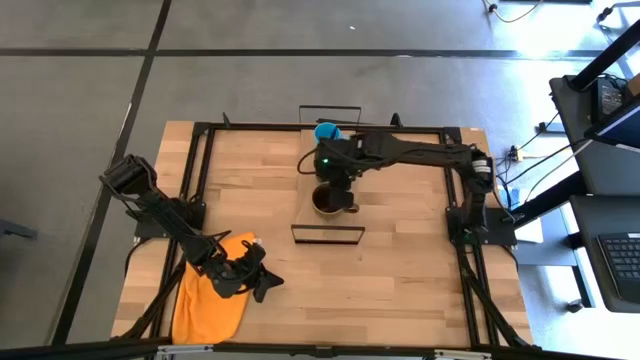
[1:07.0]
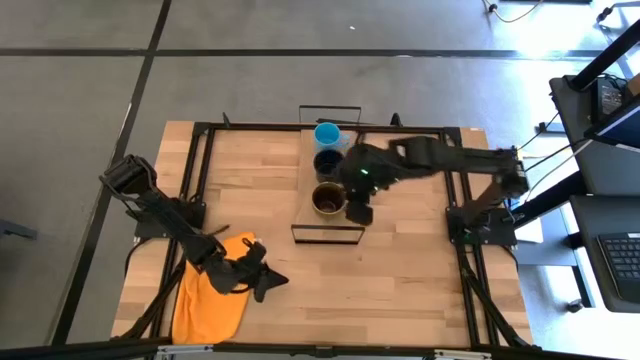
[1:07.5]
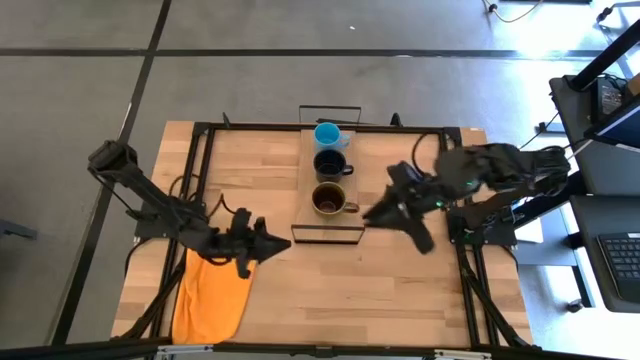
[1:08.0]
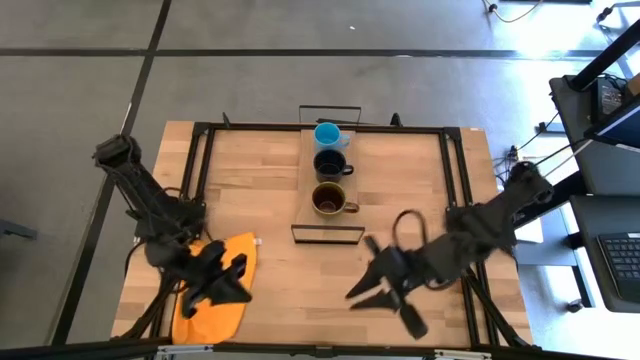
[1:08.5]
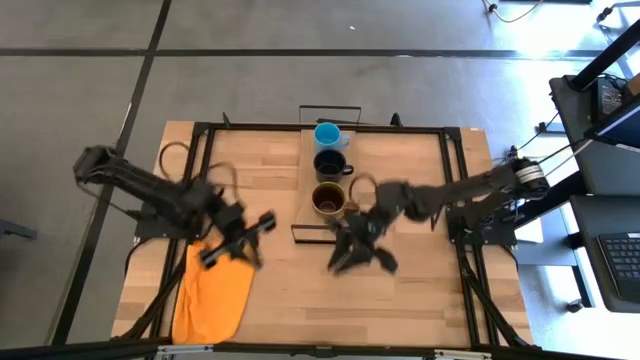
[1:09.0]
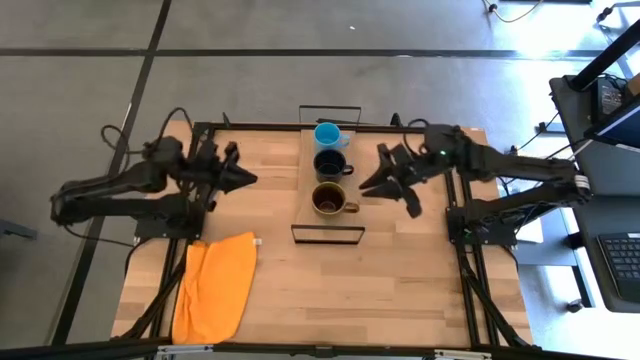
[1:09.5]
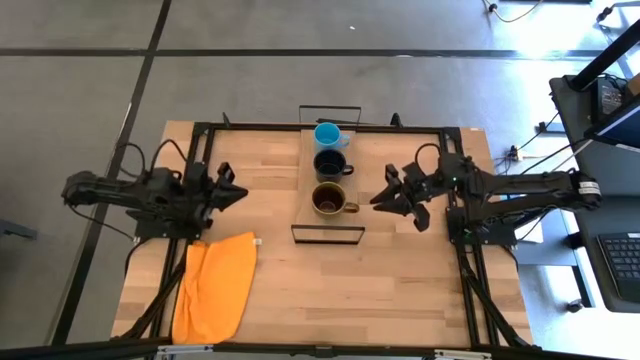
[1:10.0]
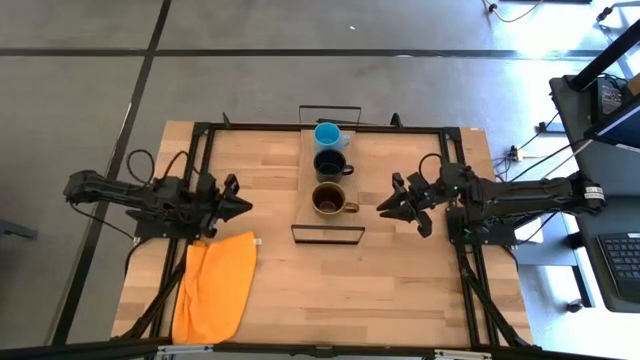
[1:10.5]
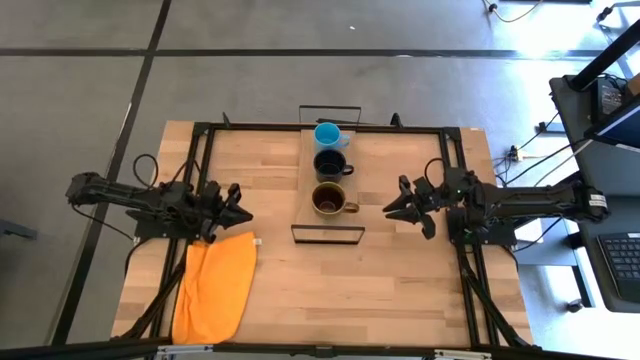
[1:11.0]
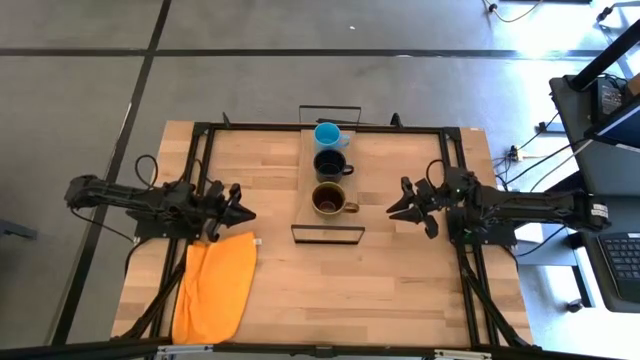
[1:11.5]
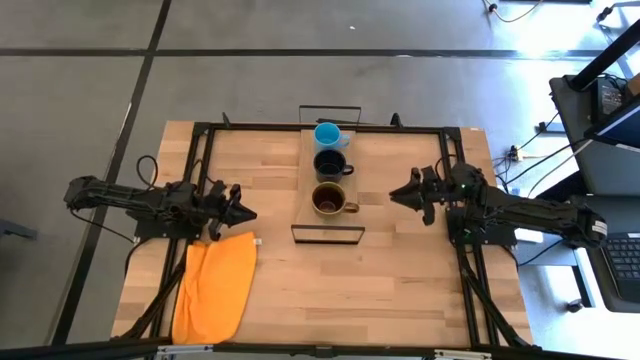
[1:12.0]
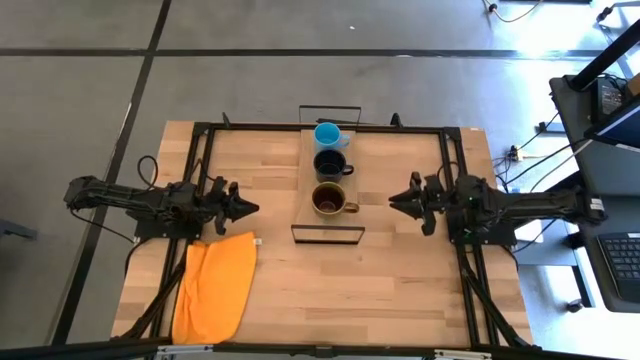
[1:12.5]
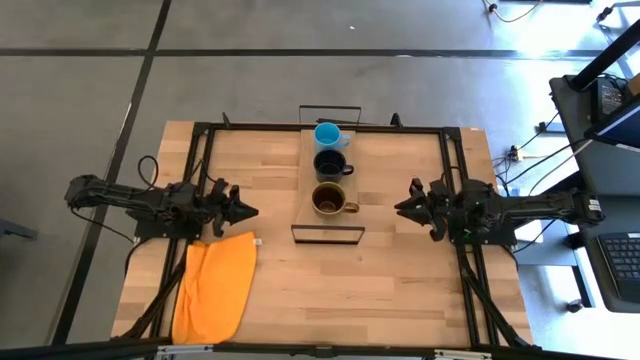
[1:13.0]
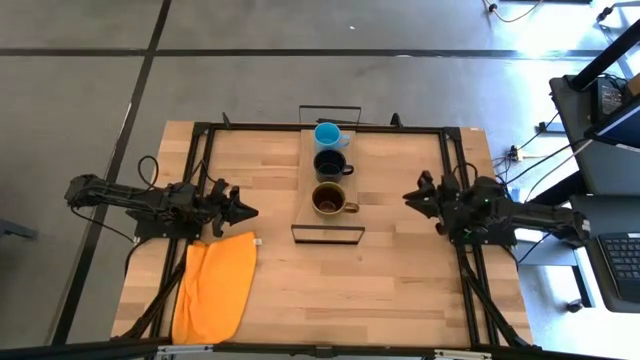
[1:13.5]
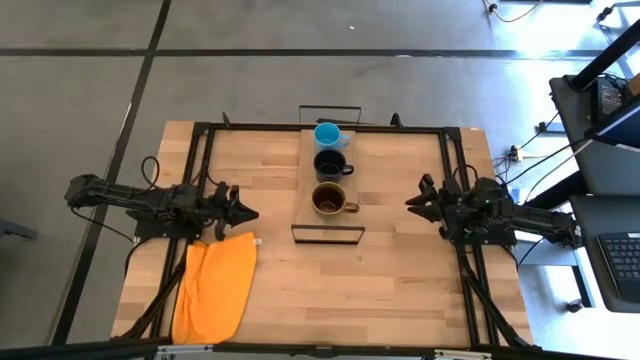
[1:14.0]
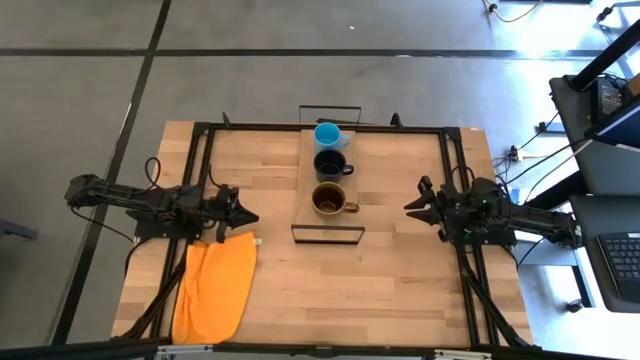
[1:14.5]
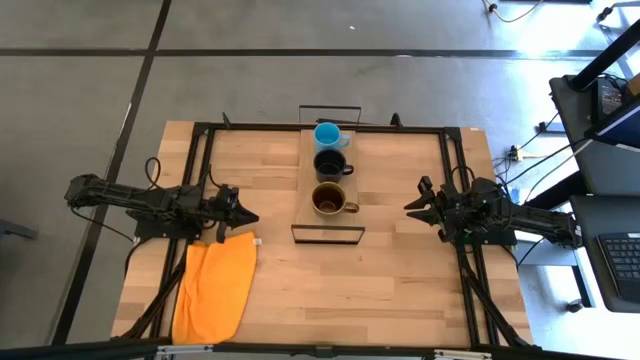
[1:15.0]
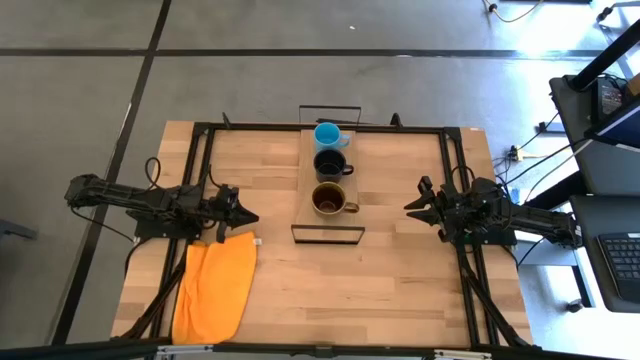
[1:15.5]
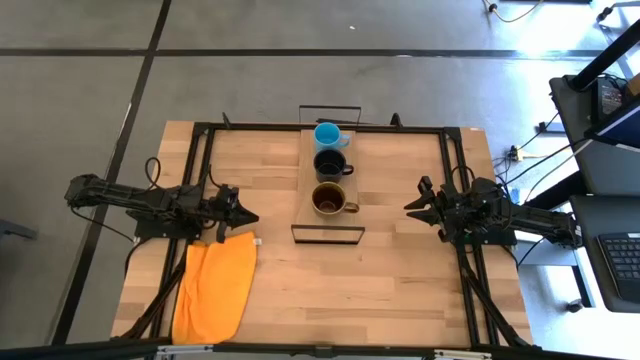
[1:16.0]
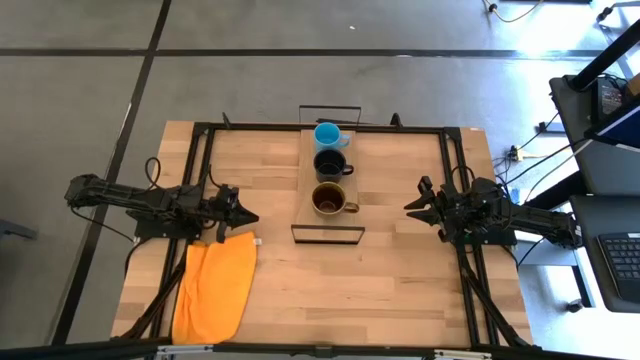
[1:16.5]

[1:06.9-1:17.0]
Task: Stack small to large cups/mugs on shelf
Return to Home Position

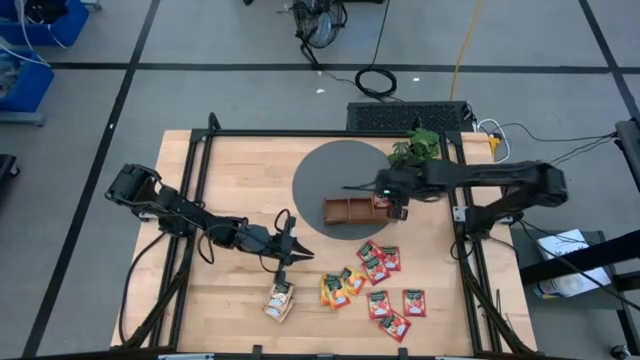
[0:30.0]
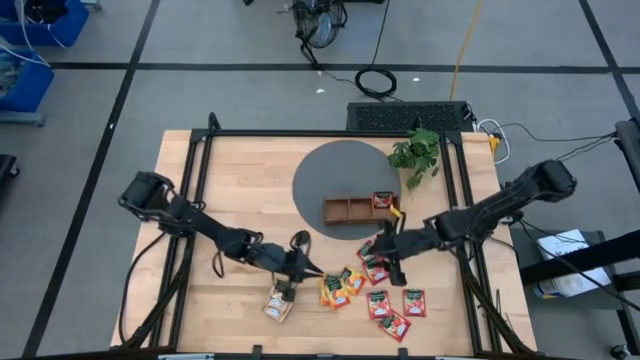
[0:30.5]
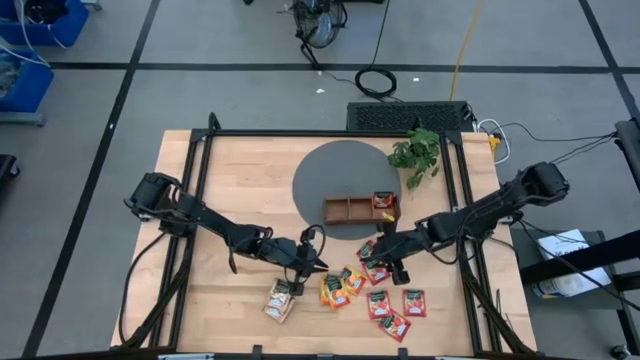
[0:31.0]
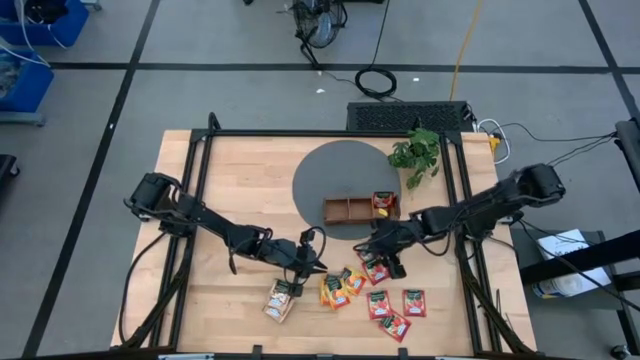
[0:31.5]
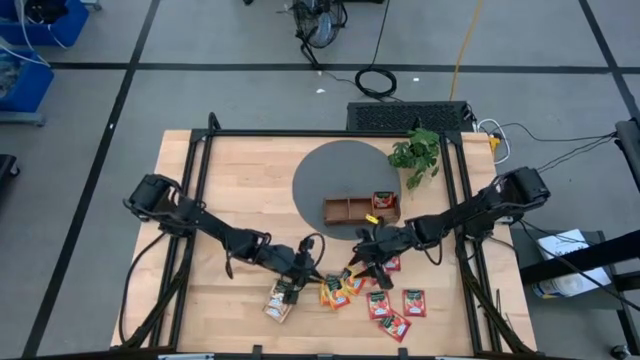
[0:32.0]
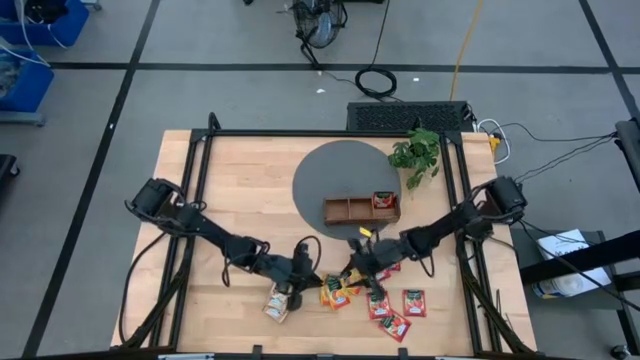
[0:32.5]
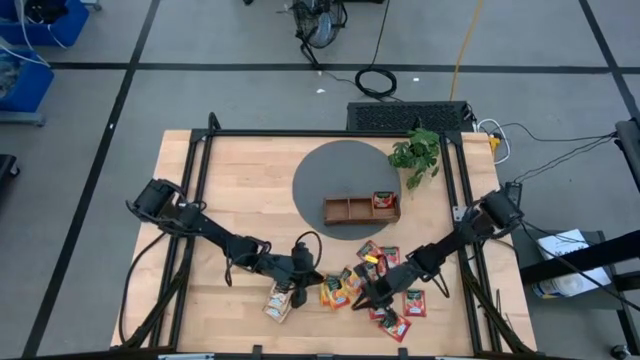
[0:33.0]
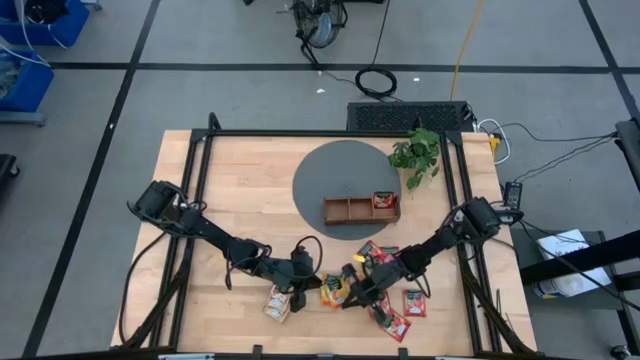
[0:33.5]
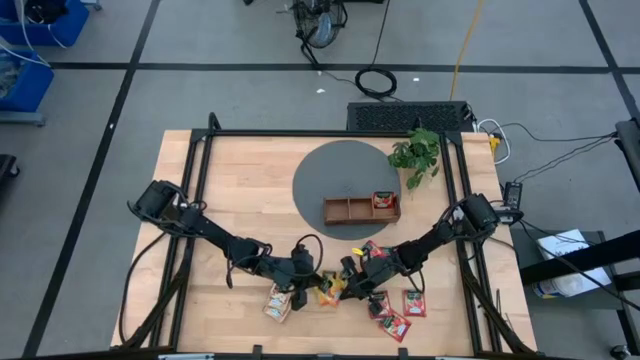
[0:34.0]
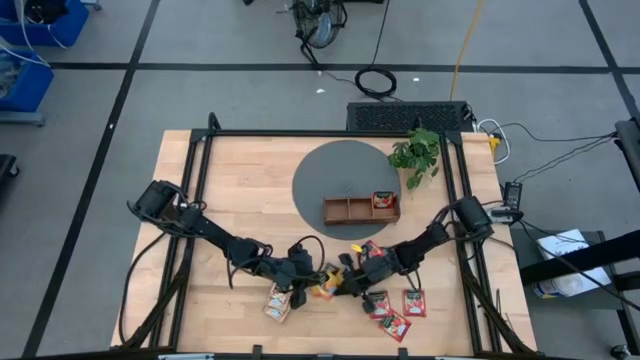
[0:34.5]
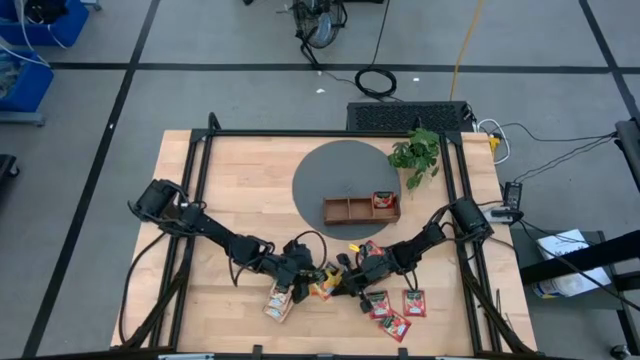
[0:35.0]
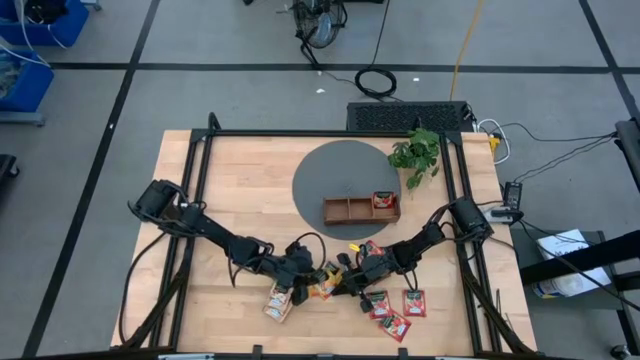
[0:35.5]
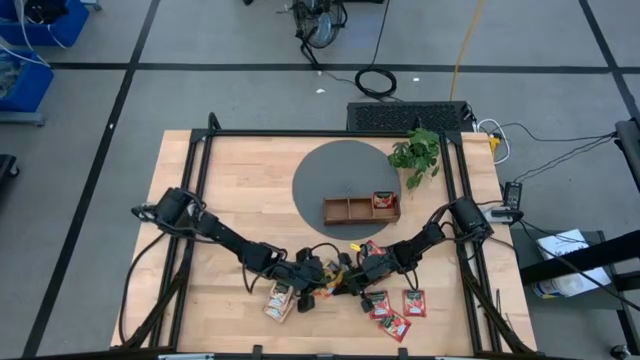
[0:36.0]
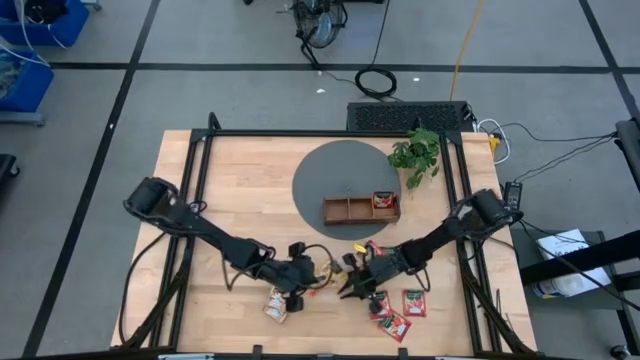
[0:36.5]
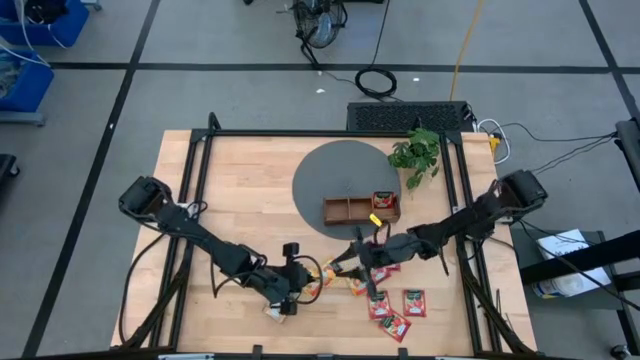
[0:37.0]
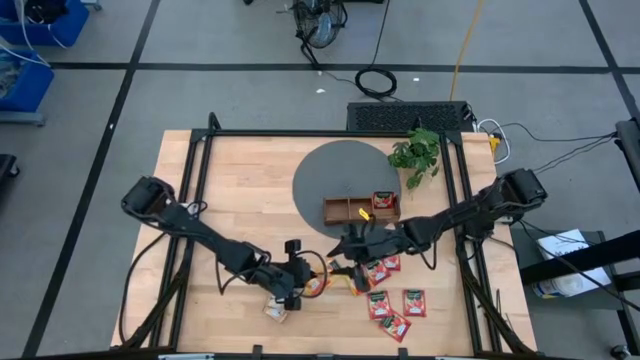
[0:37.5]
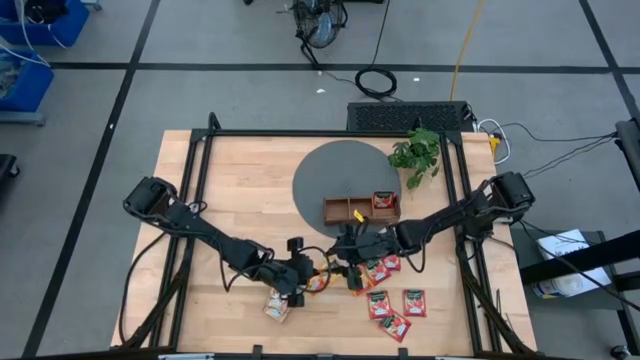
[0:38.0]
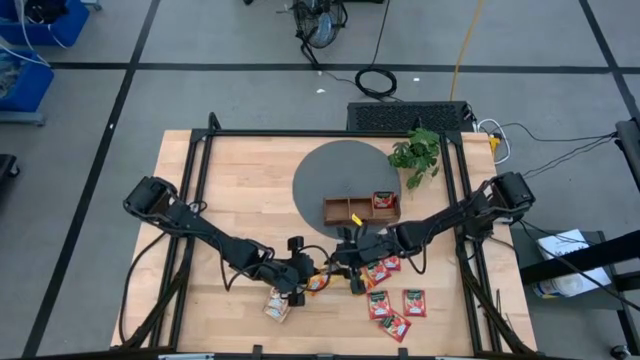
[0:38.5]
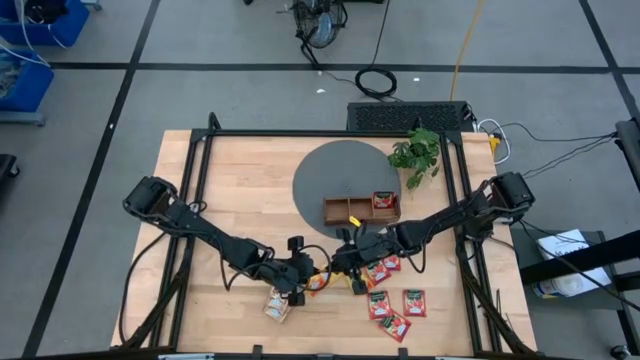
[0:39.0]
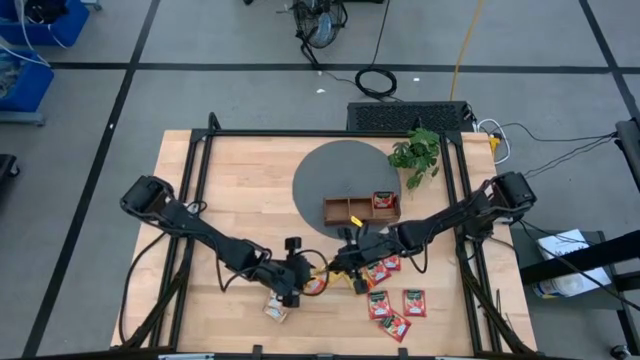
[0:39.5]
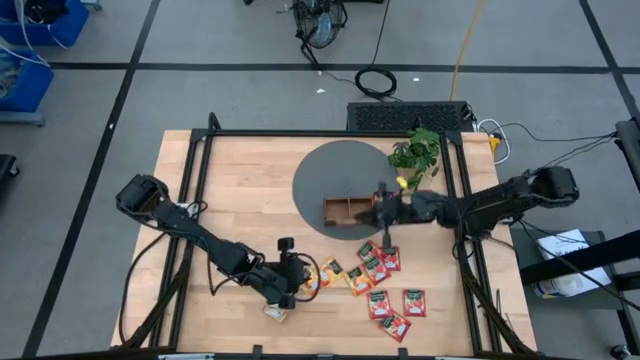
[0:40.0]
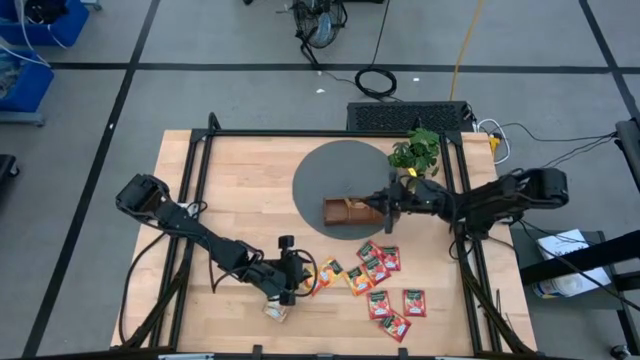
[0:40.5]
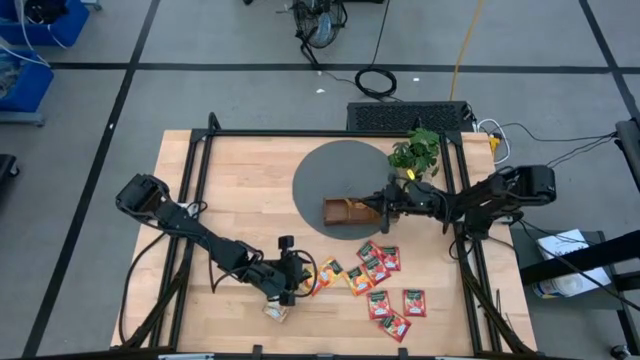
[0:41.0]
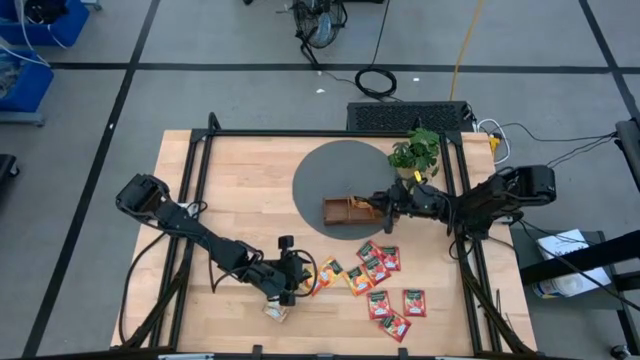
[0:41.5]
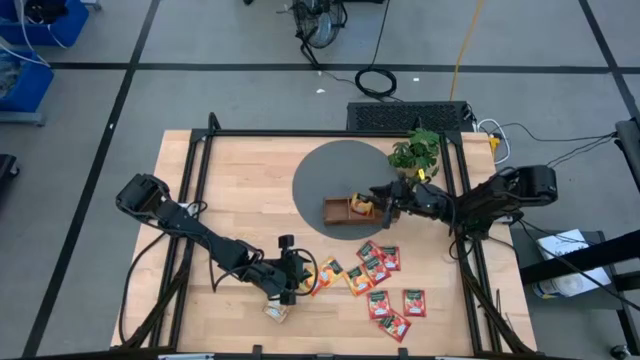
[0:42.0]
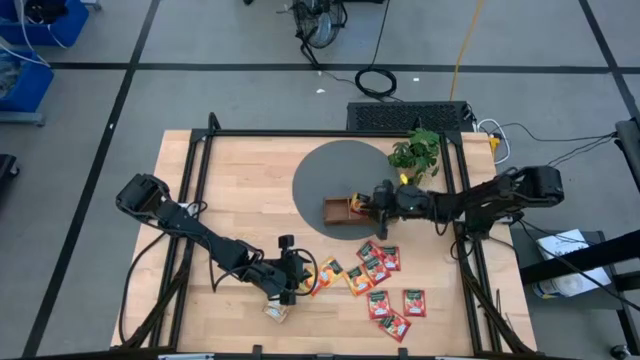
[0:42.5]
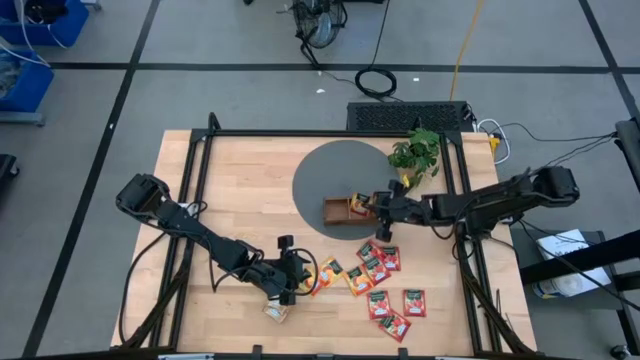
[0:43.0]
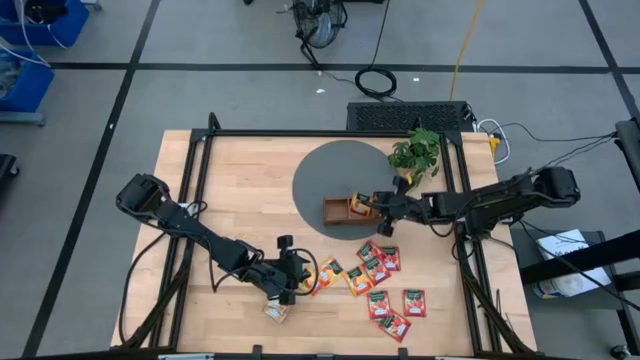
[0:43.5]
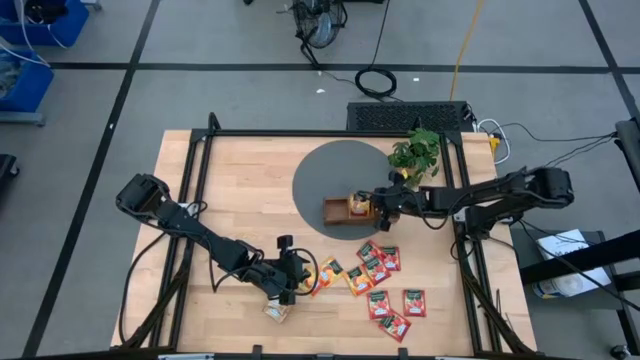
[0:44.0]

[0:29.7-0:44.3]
Task: Pick & Place Tea
Put the yellow tea bag into the middle section of the wooden organizer
